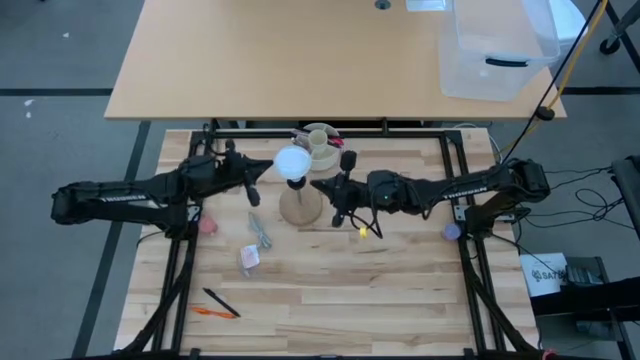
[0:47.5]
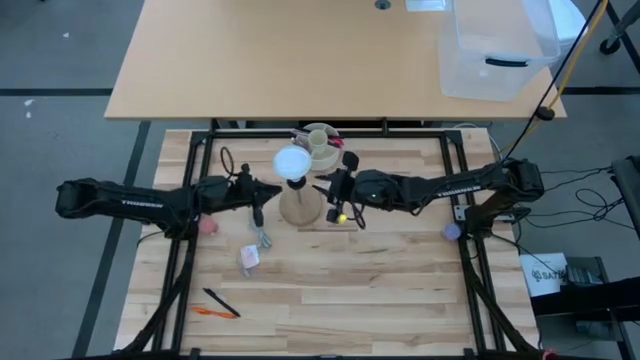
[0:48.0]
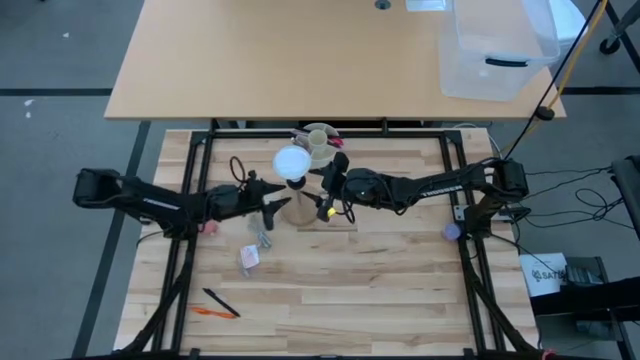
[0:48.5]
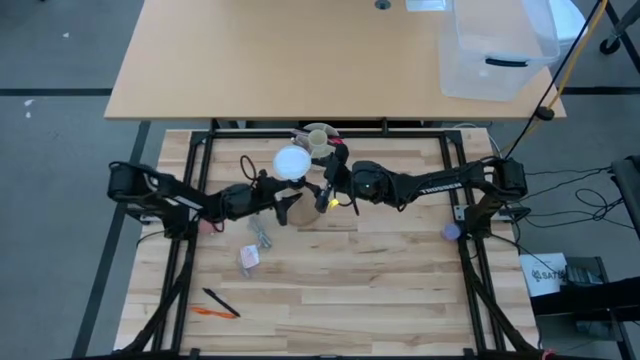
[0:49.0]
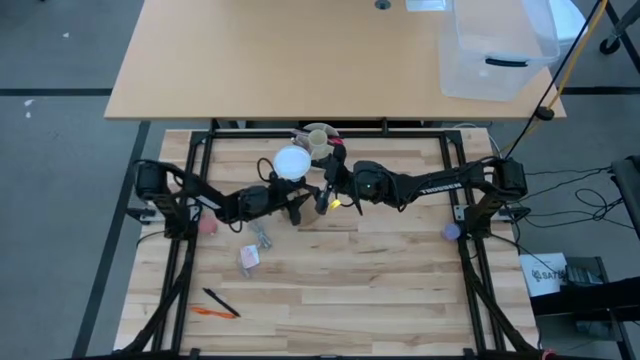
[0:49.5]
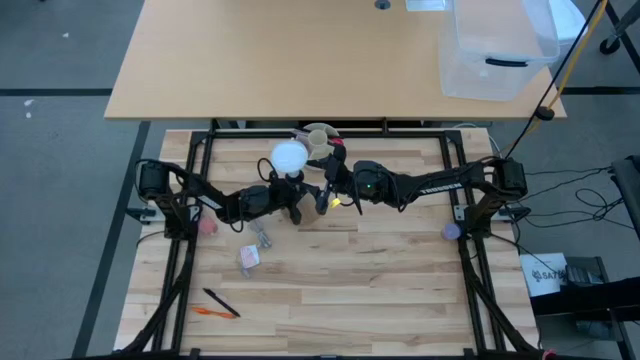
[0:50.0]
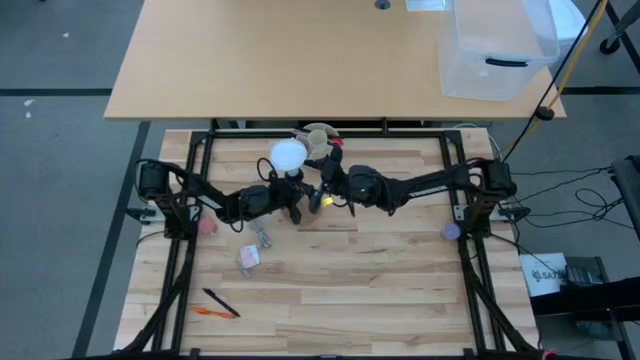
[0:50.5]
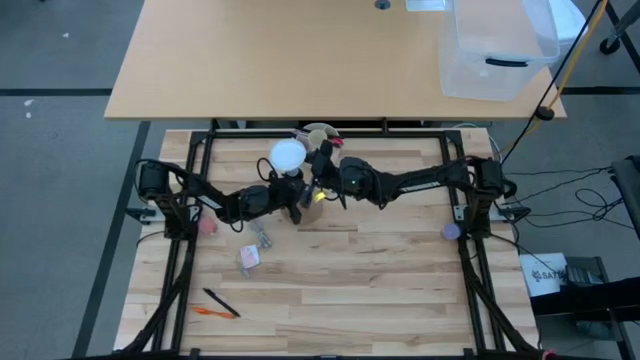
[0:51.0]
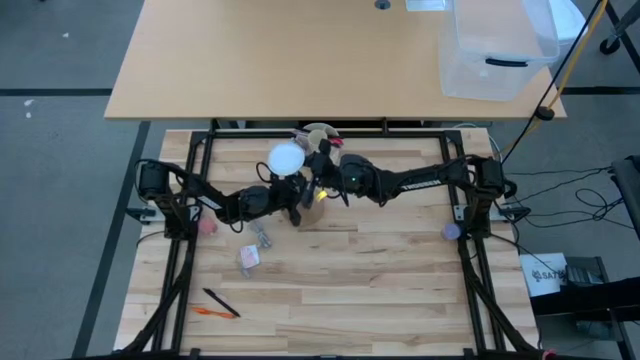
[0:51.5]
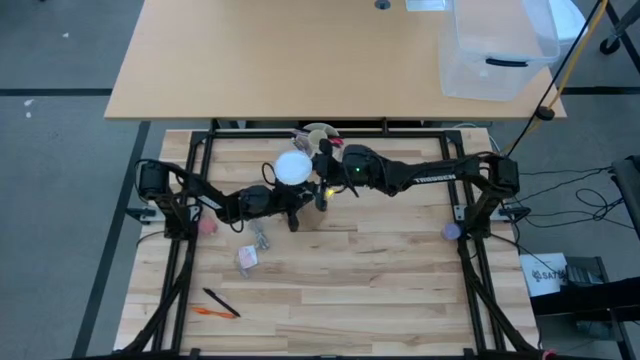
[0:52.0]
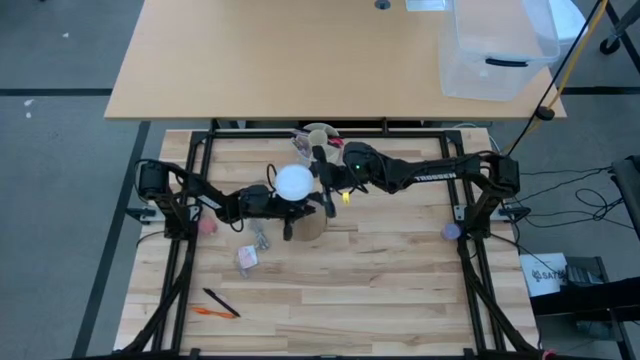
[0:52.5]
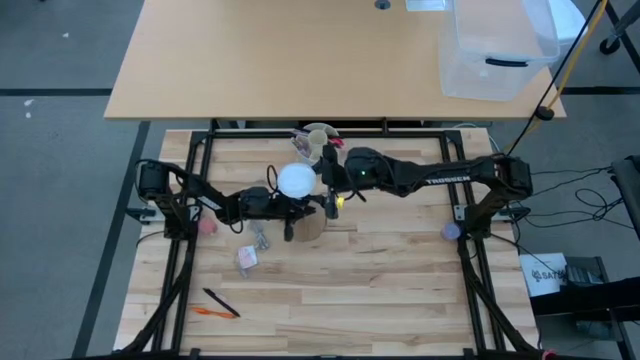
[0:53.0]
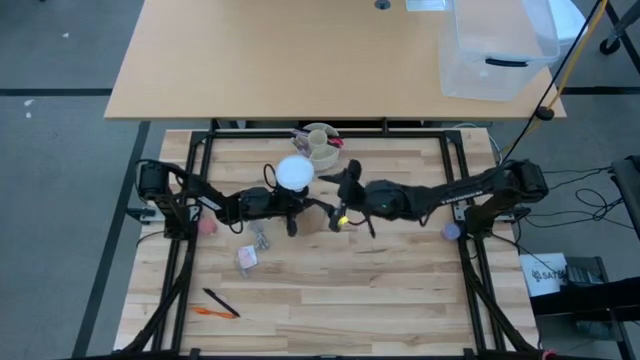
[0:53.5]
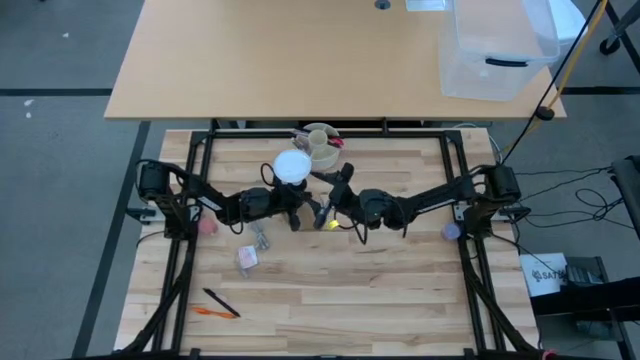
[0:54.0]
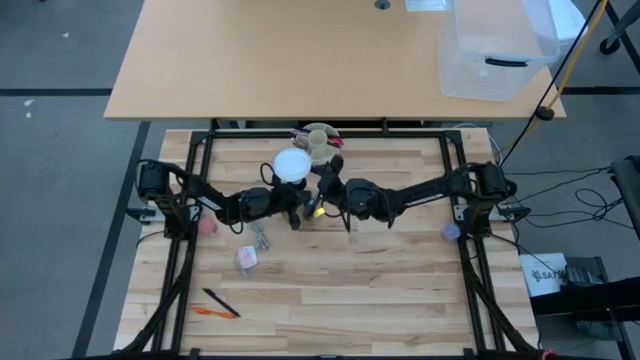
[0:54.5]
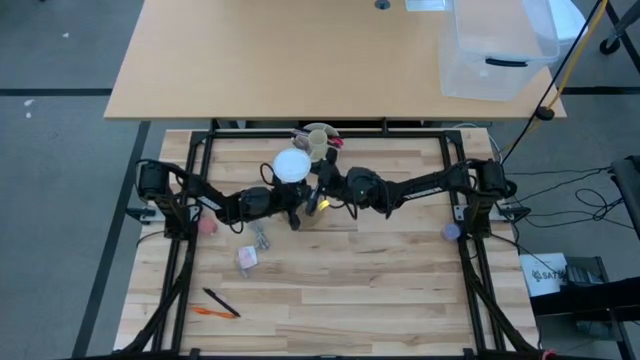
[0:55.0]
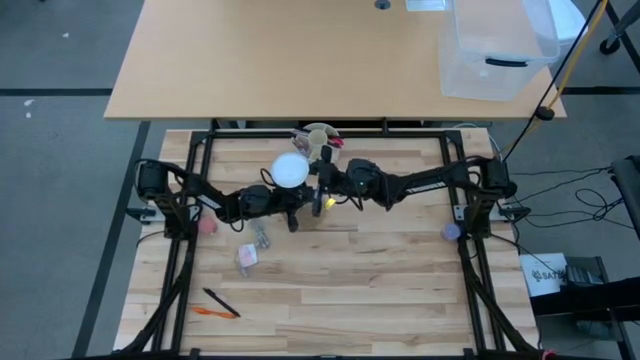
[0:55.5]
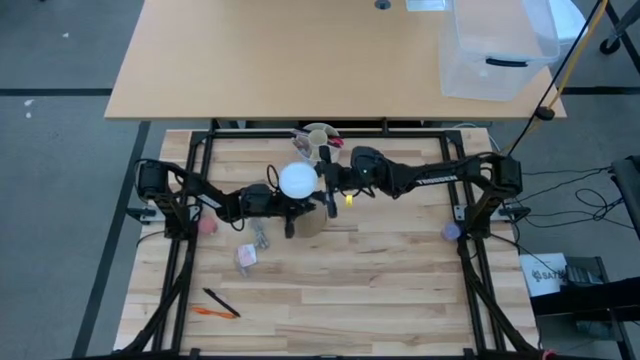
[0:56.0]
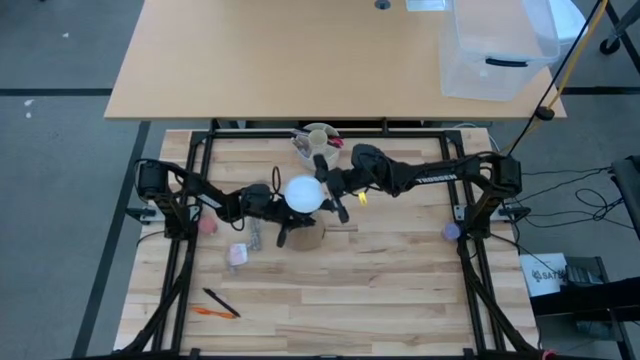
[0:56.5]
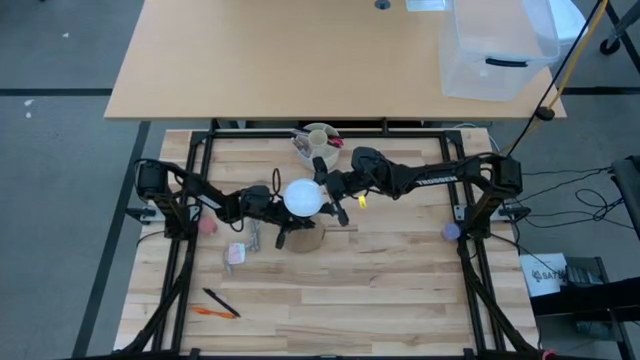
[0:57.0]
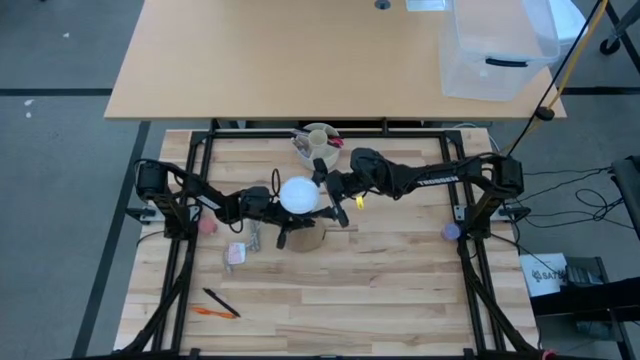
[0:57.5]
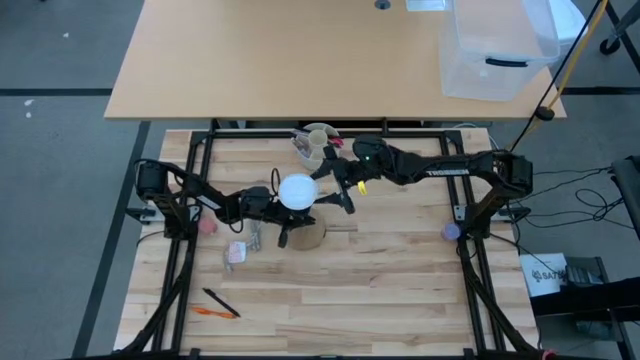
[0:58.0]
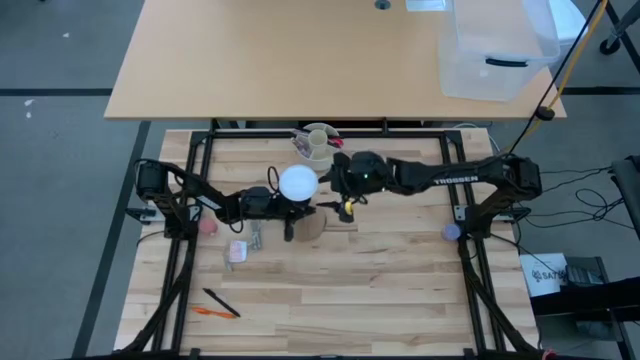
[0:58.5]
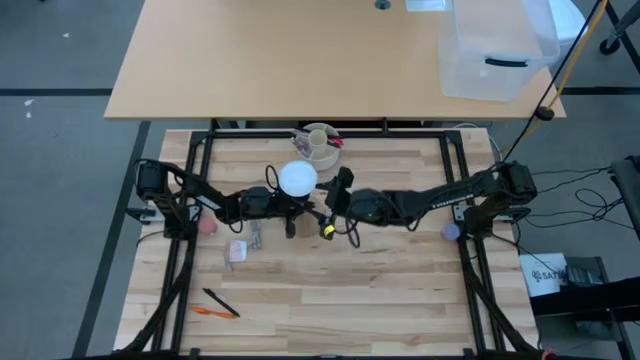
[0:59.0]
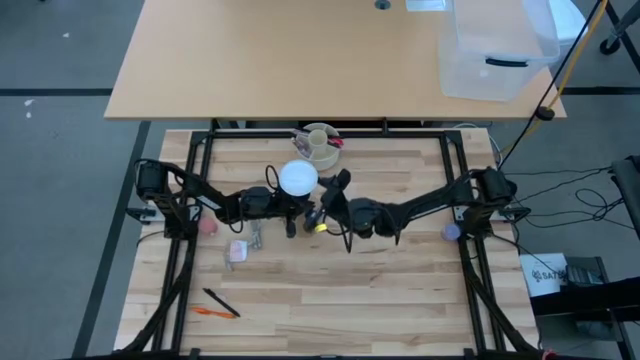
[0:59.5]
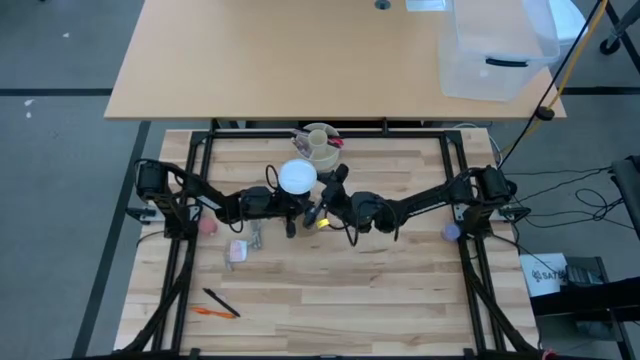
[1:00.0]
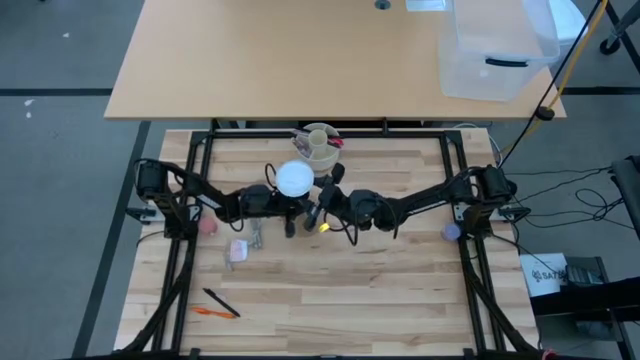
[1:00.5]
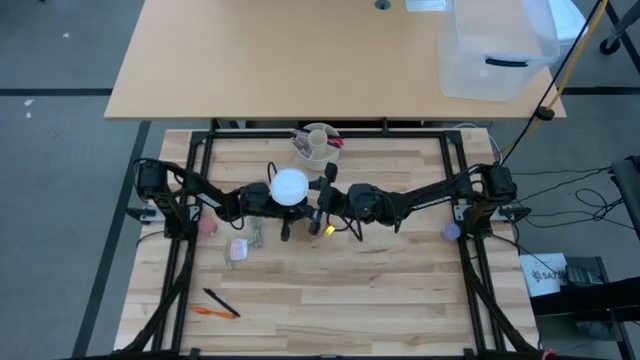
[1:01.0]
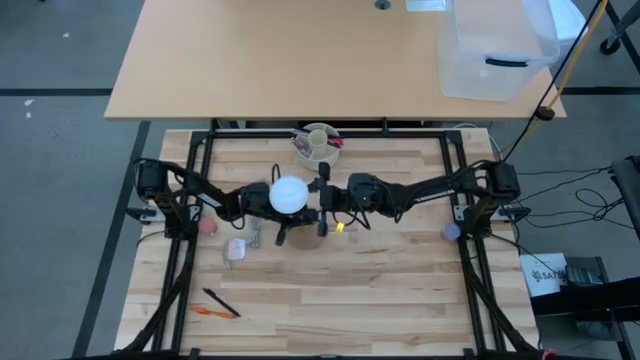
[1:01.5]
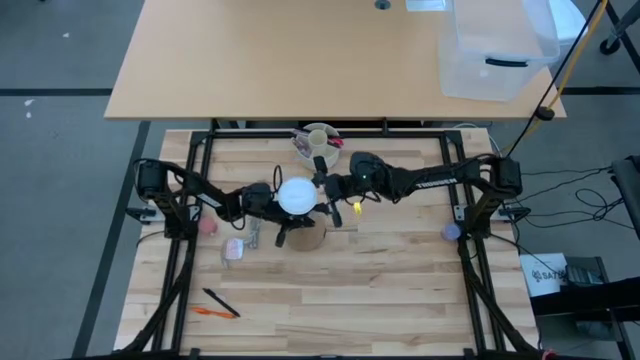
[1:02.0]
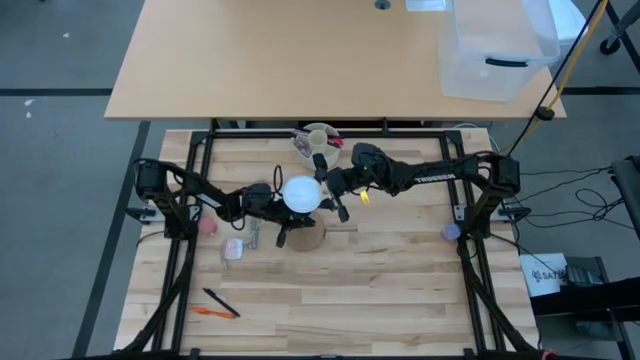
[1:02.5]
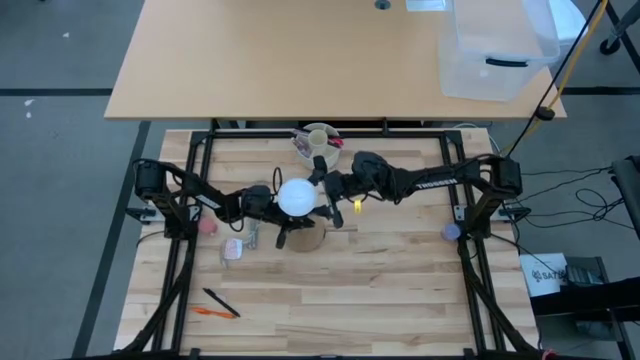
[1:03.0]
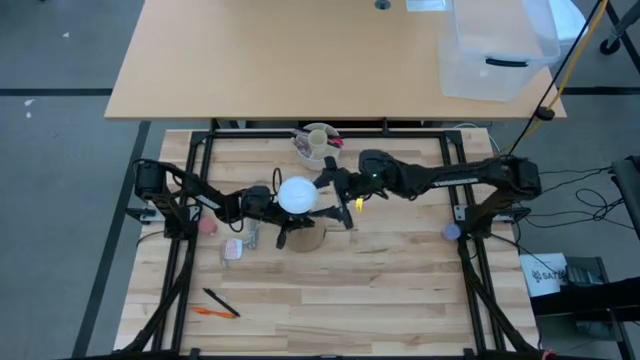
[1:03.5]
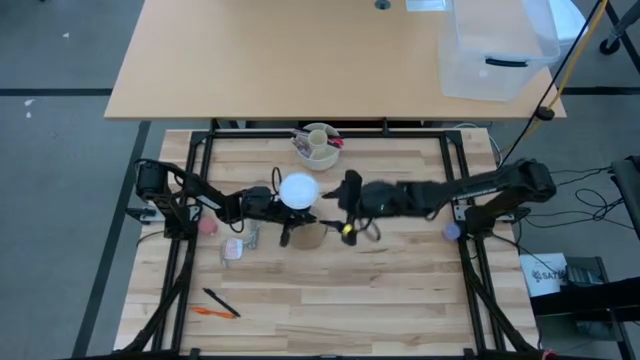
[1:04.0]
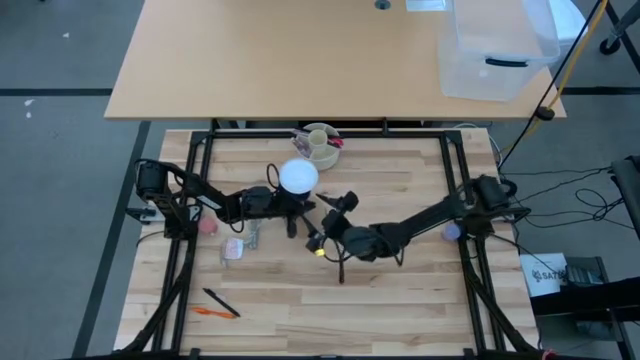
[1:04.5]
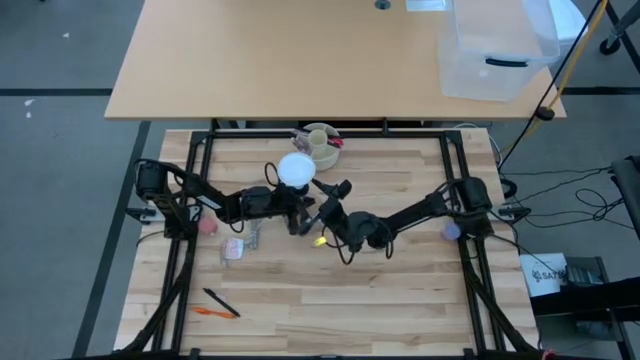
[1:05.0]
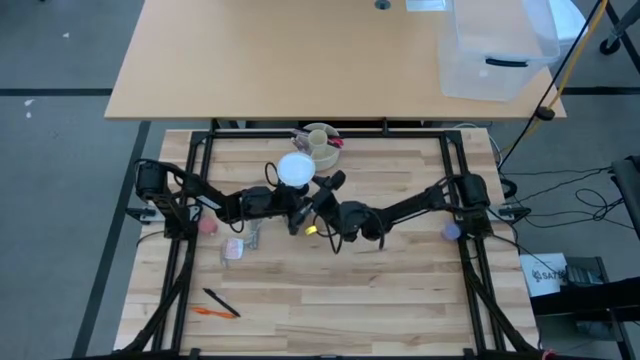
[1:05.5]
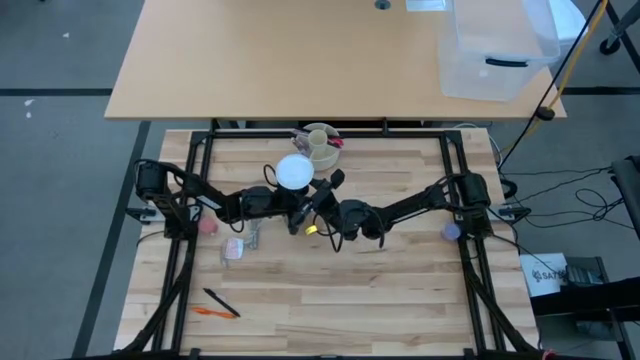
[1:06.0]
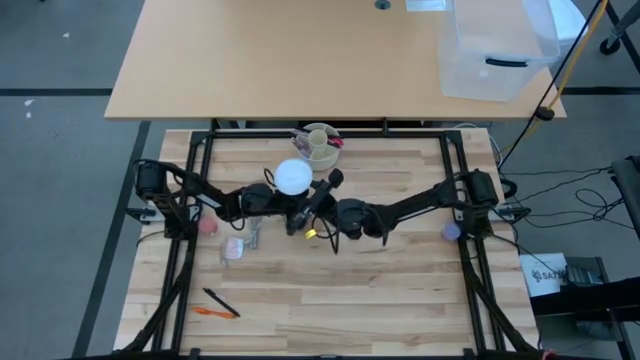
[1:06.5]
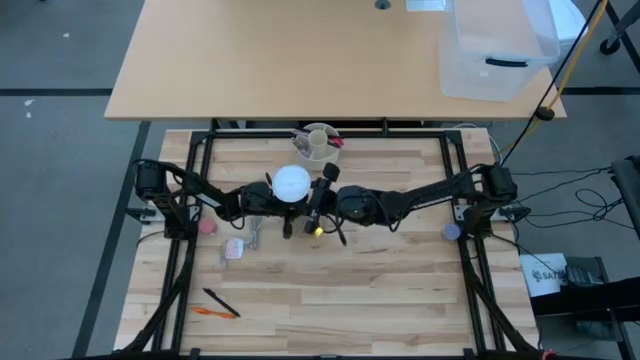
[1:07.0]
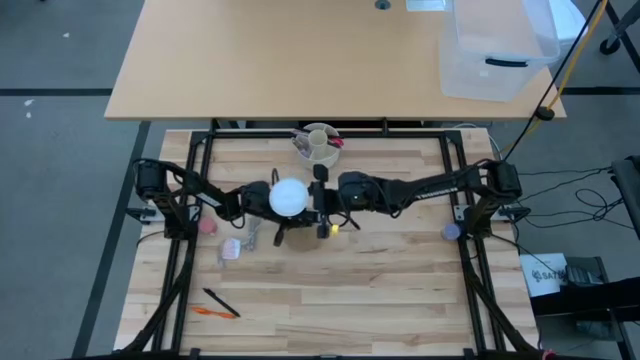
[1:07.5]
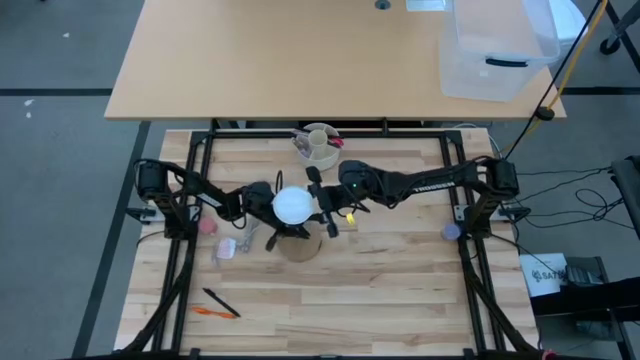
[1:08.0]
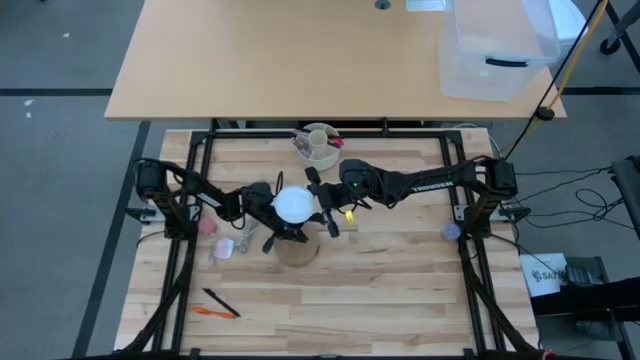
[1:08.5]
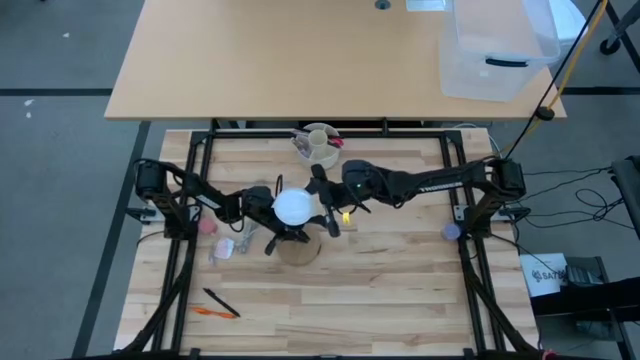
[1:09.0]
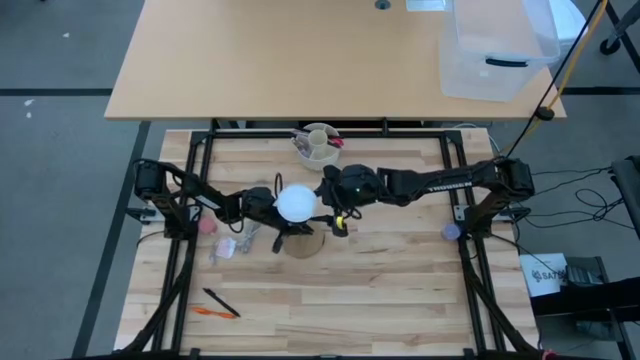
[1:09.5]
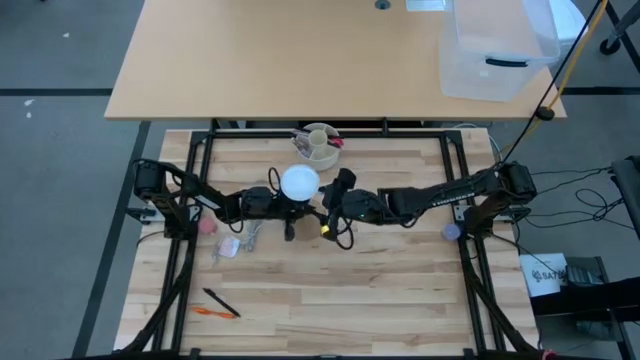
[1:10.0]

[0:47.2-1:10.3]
Task: Screw lightbulb
Remove the lightbulb from the wooden lamp
